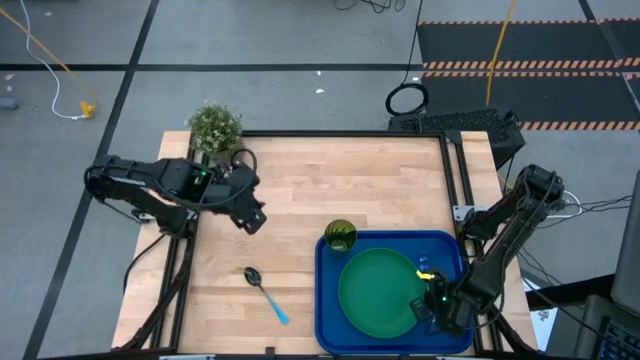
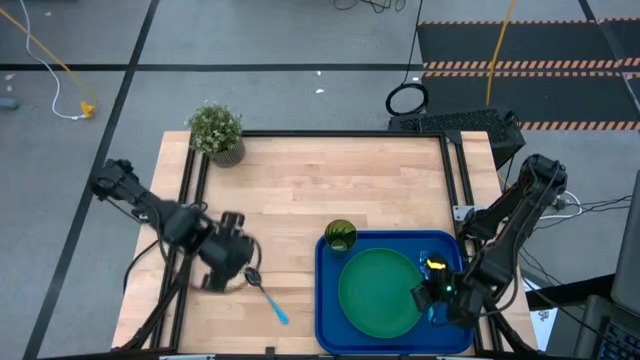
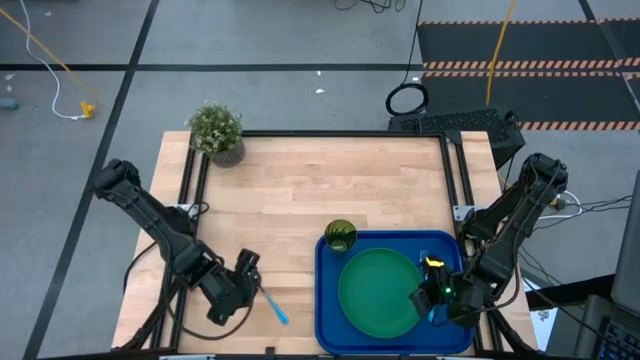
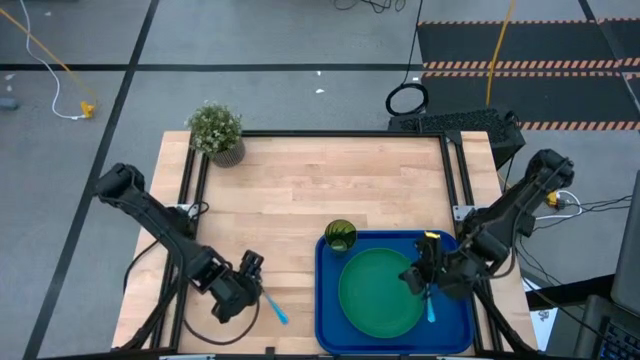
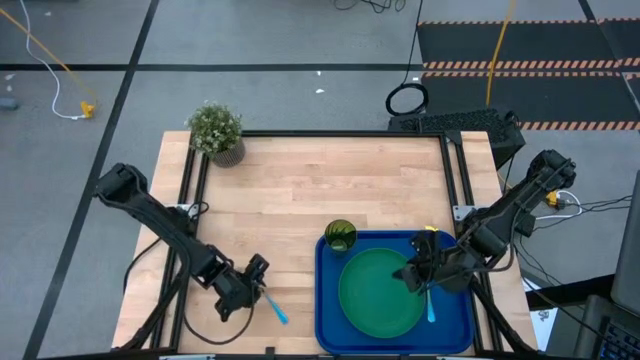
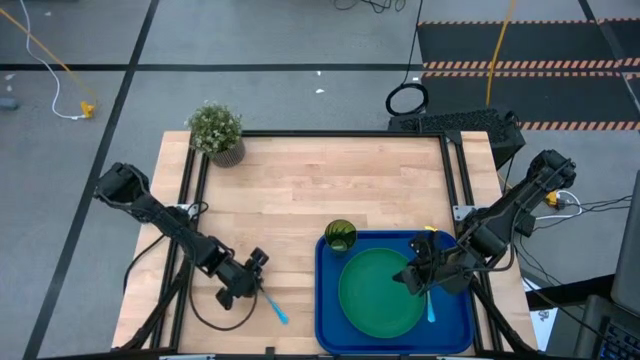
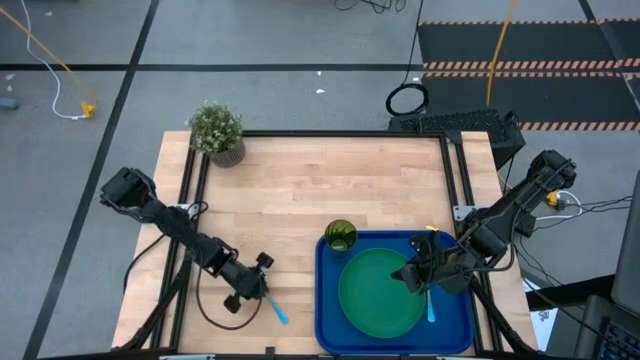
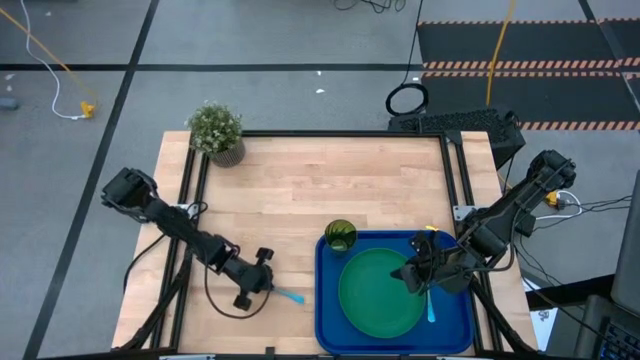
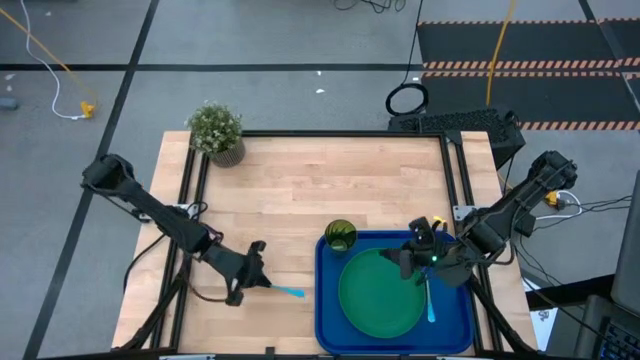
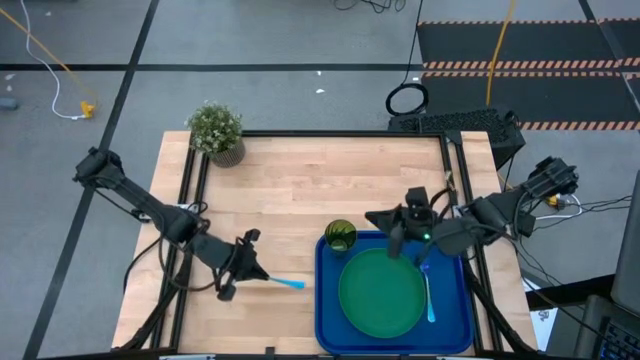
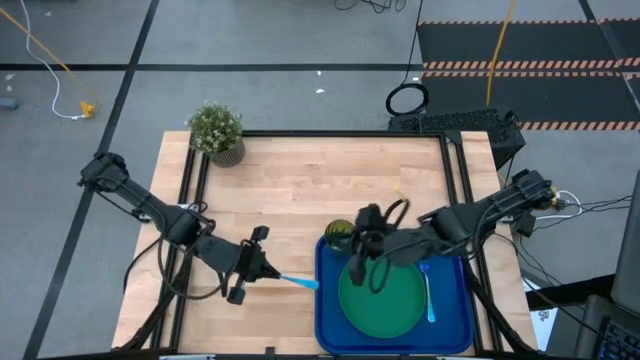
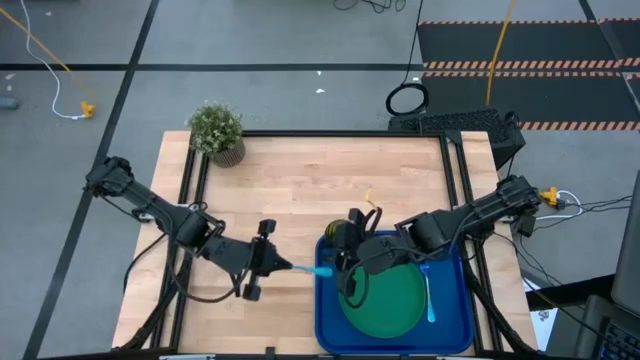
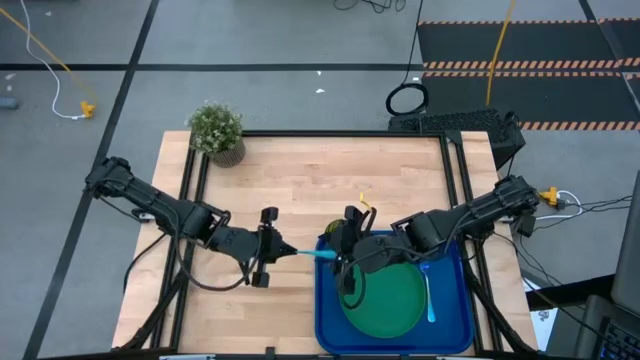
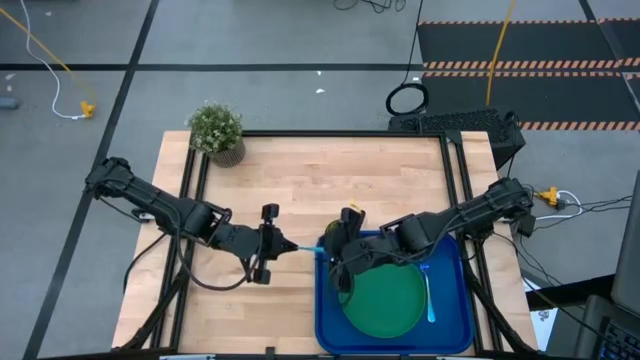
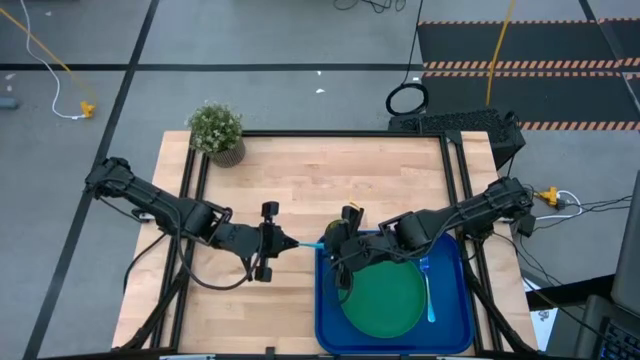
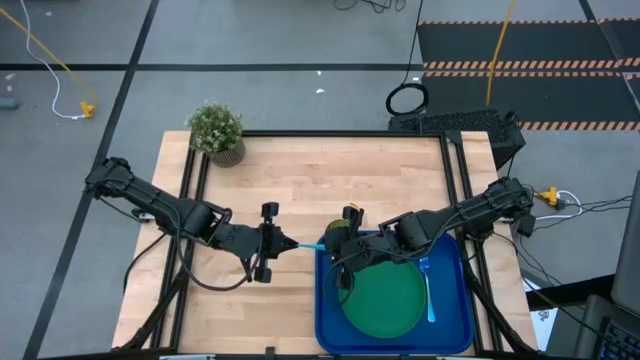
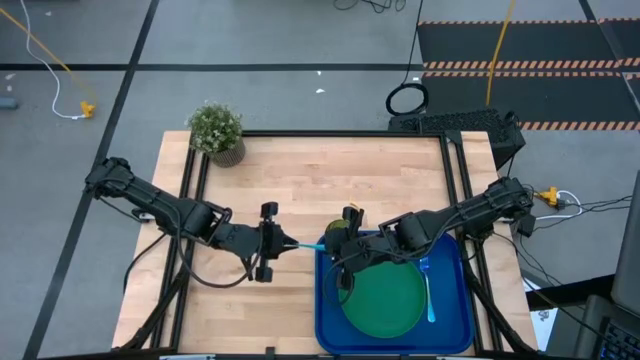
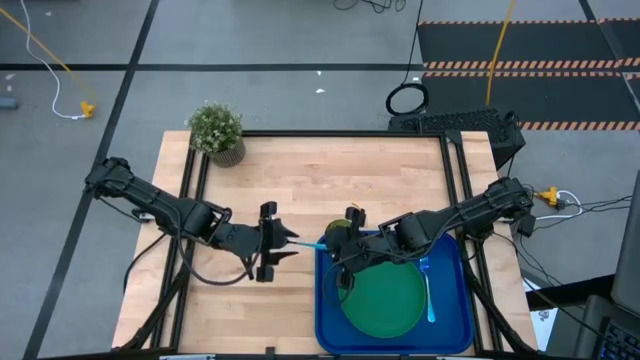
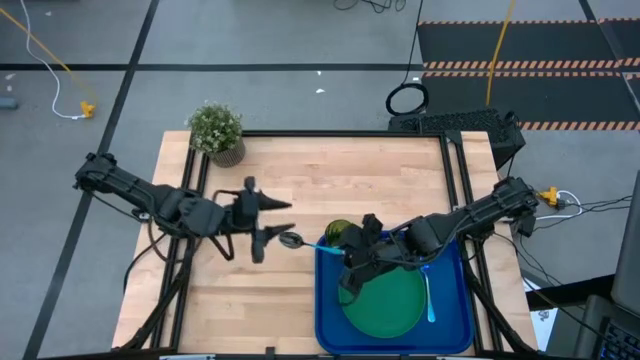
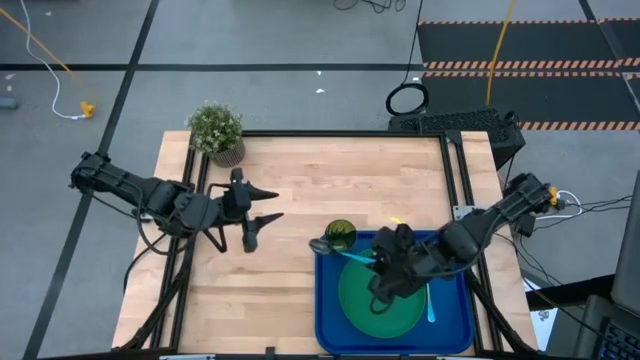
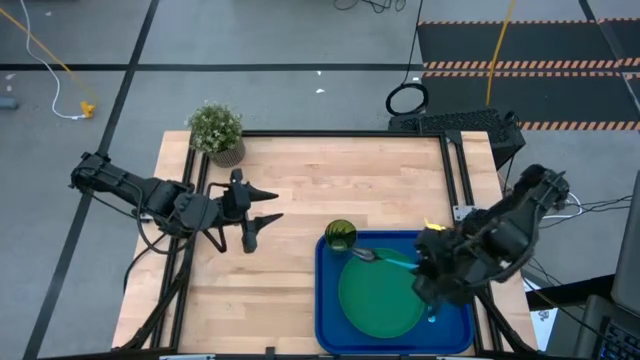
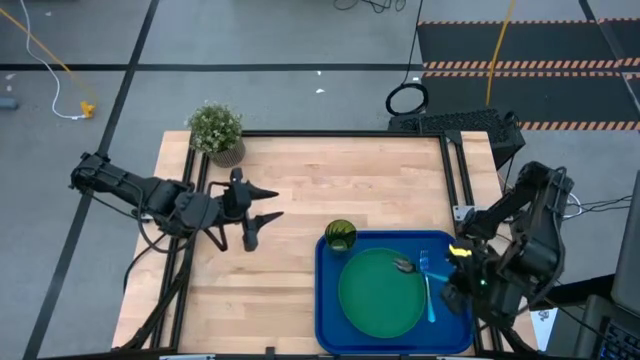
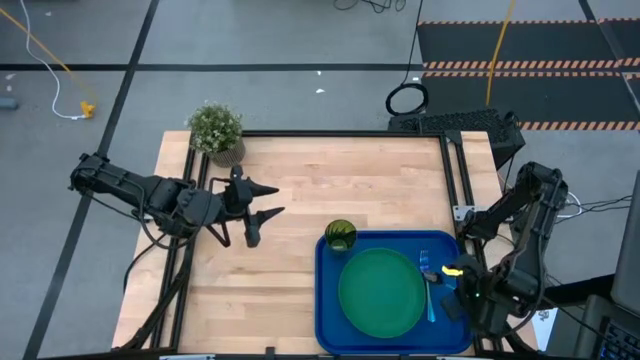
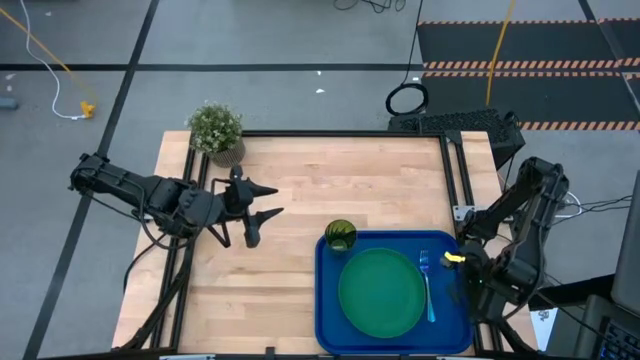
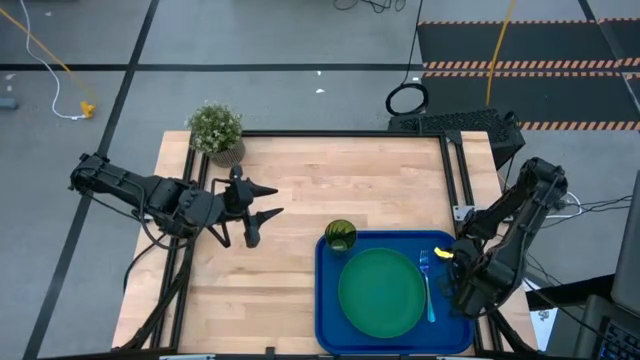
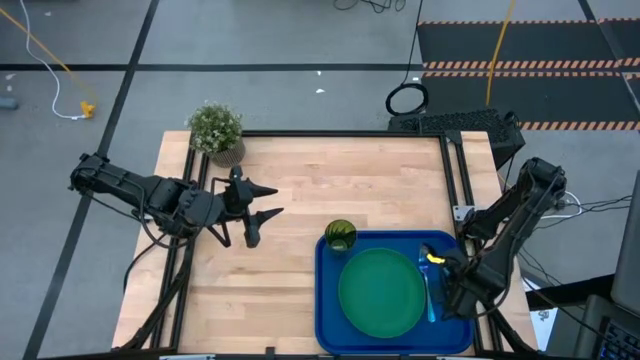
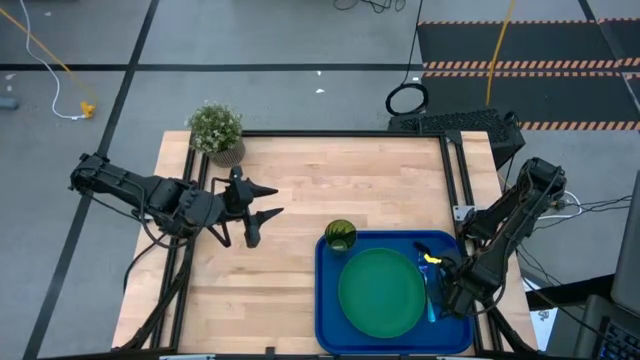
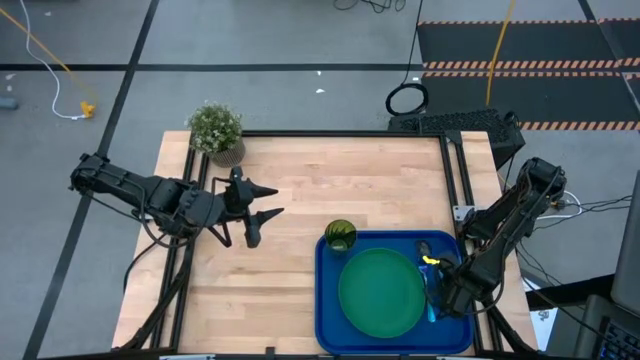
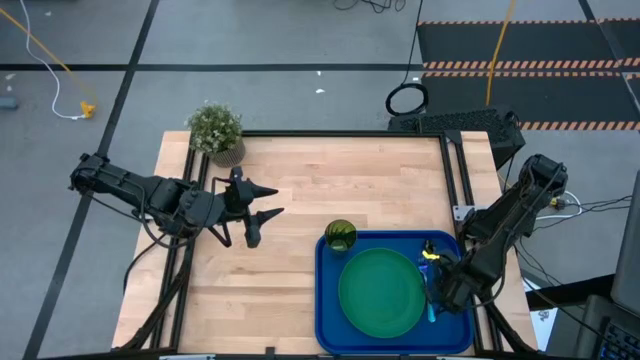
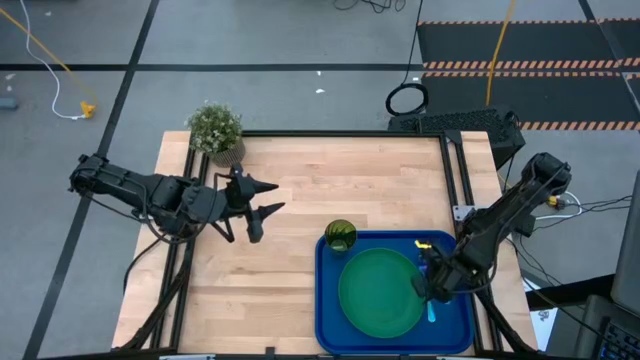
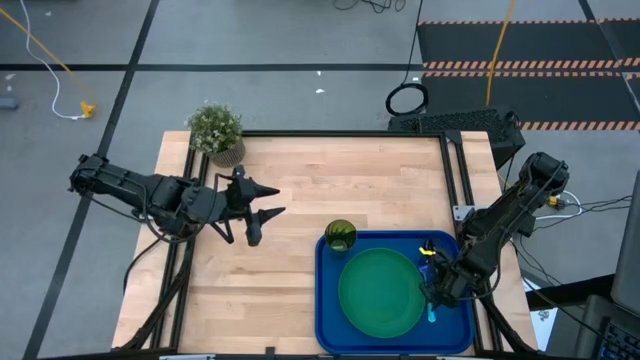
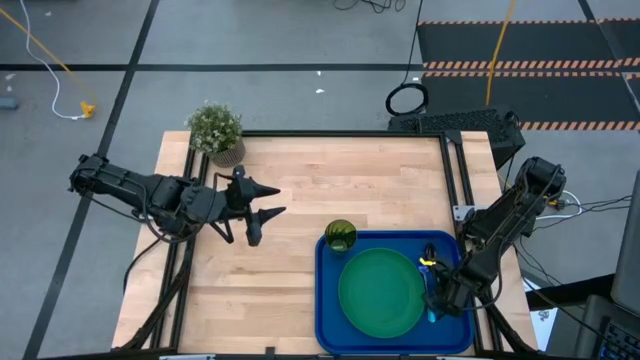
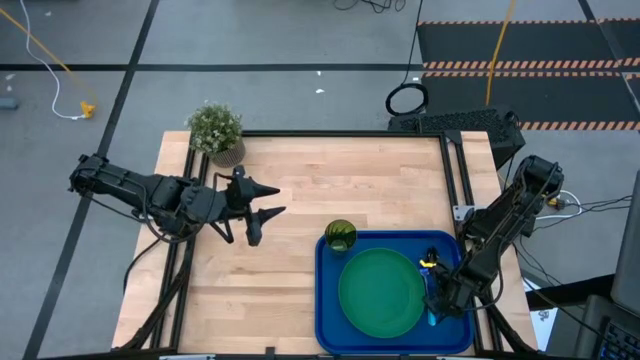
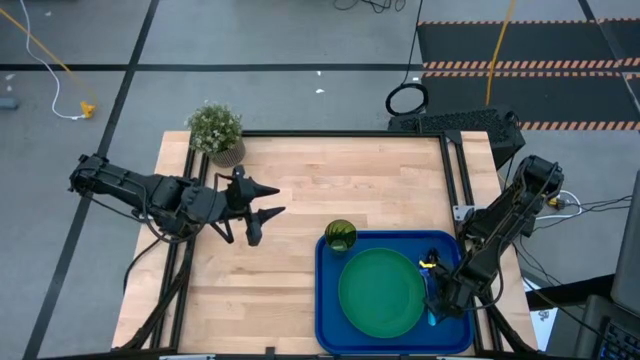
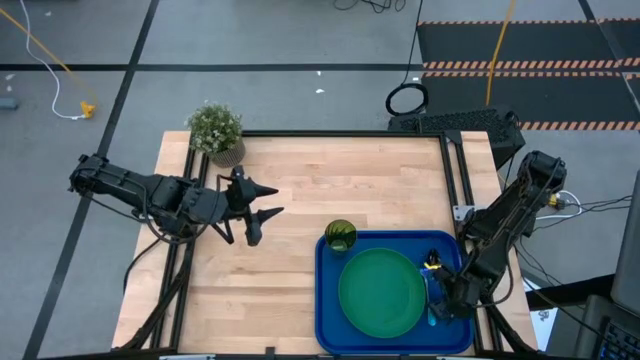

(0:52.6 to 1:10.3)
Task: Pick and place plate/cup/fork/spoon on tray
Put the blue spoon on the blue tray to the right of the blue fork

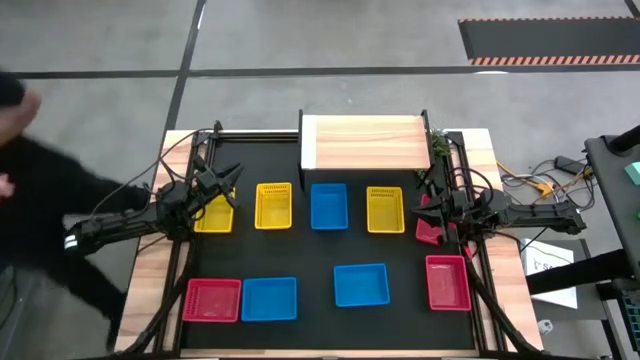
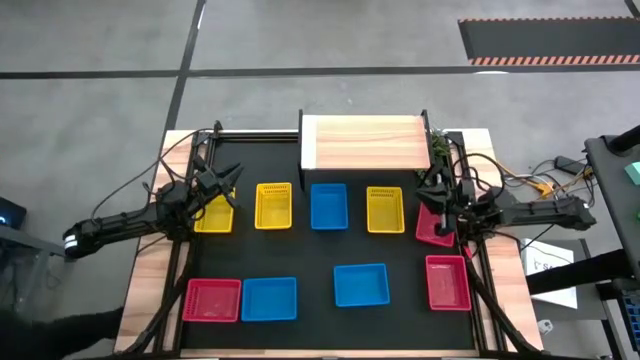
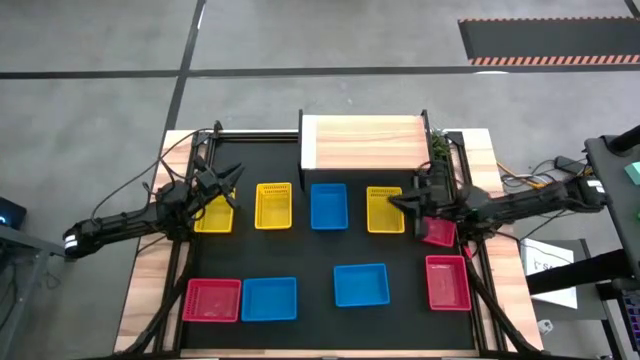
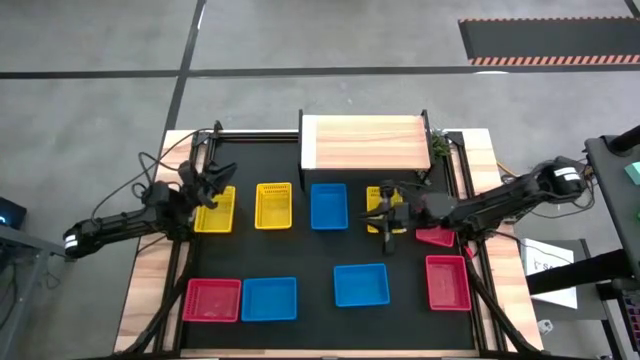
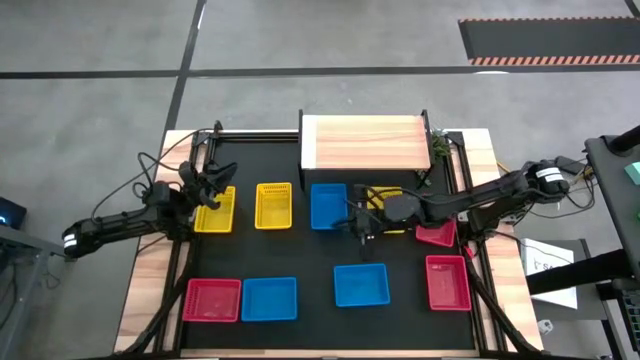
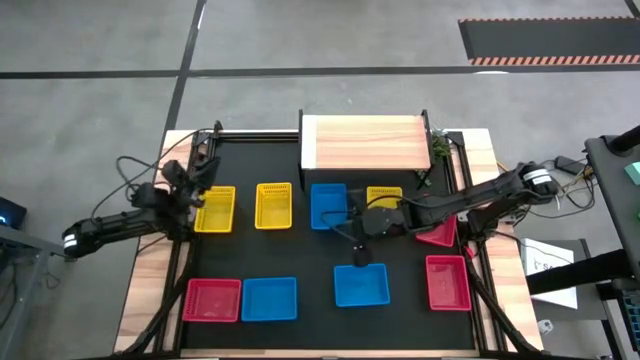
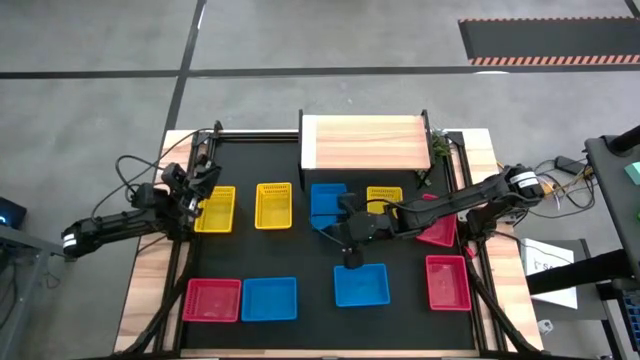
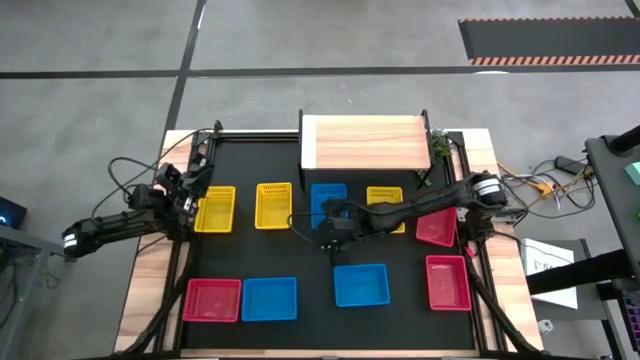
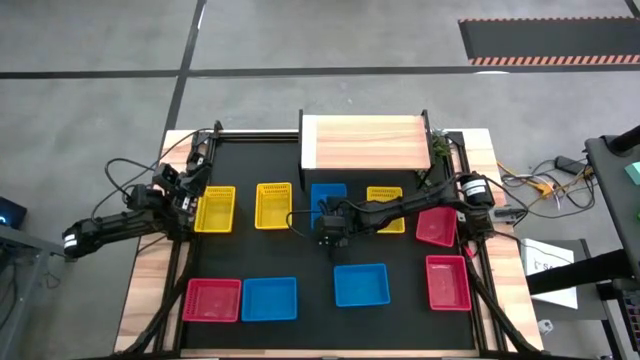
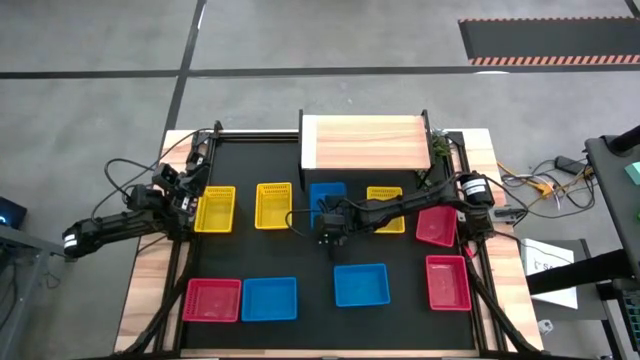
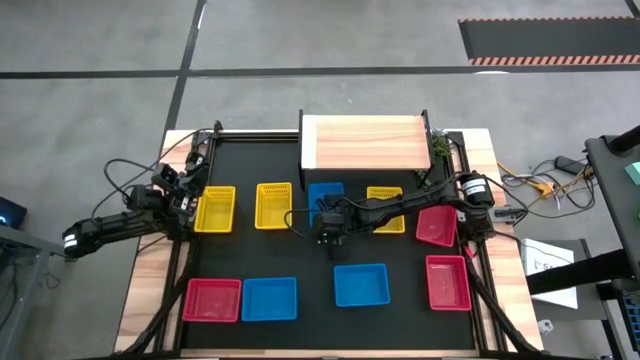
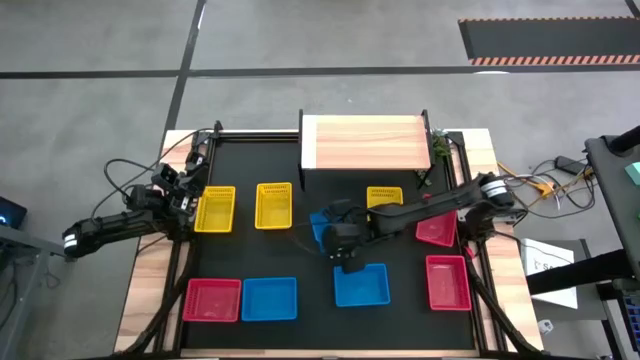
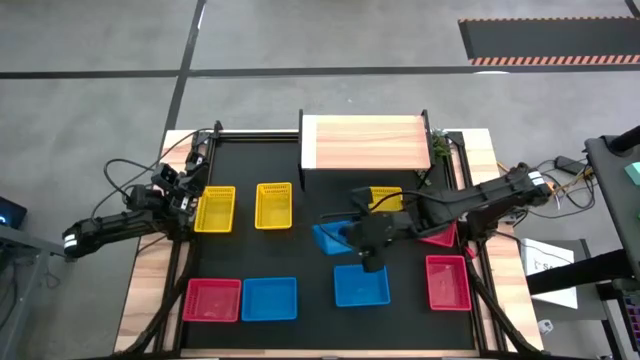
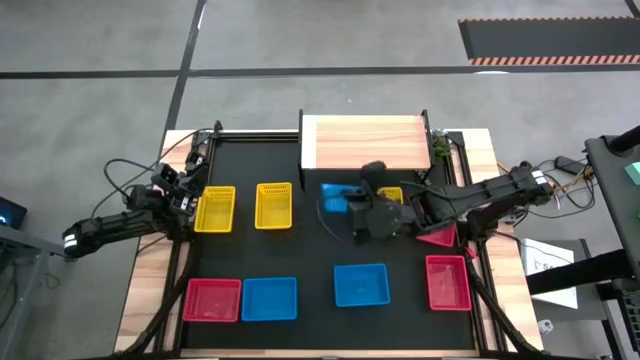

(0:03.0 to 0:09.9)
Task: Stack baskets on shelf by color
Put the top blue bin on the shelf
